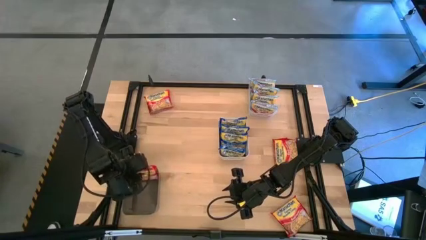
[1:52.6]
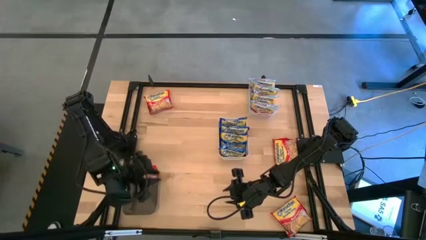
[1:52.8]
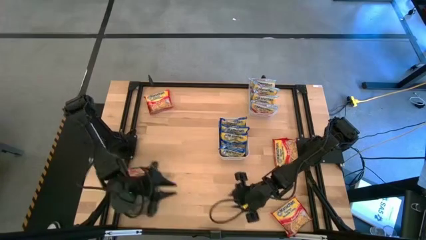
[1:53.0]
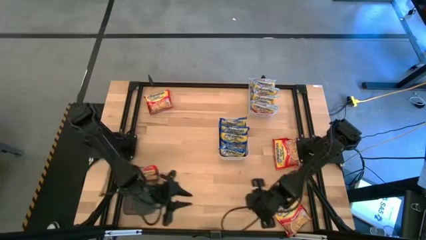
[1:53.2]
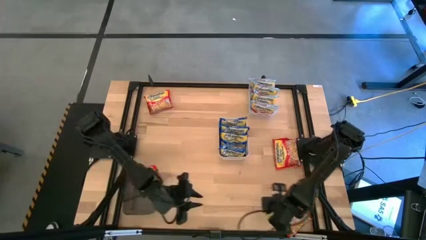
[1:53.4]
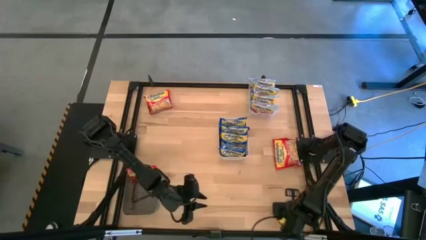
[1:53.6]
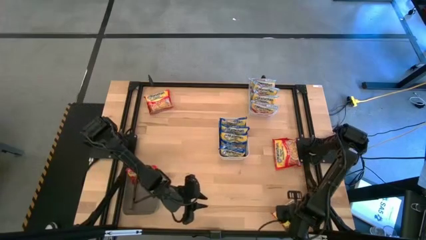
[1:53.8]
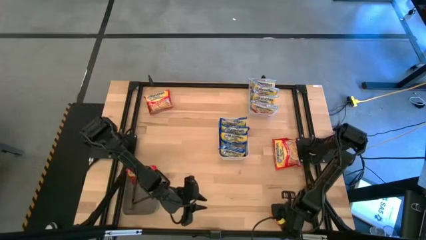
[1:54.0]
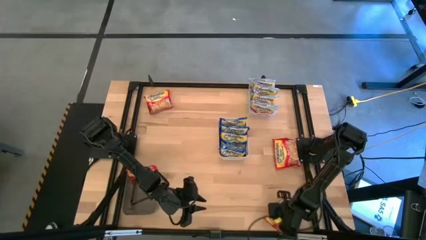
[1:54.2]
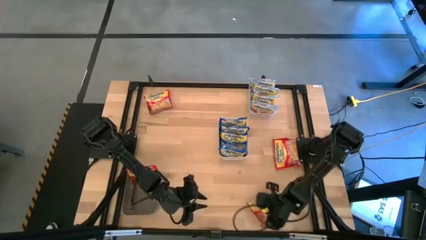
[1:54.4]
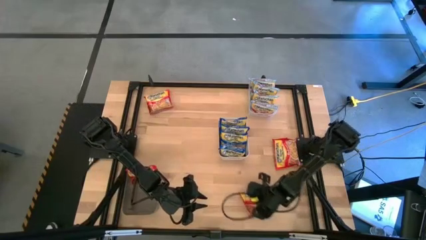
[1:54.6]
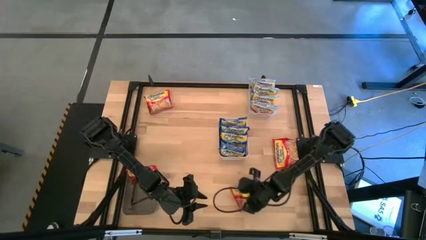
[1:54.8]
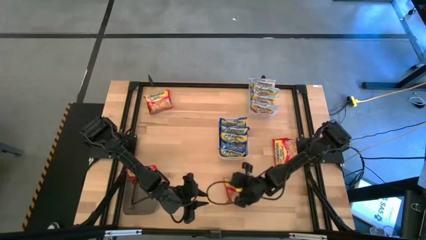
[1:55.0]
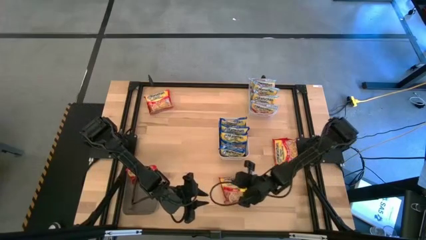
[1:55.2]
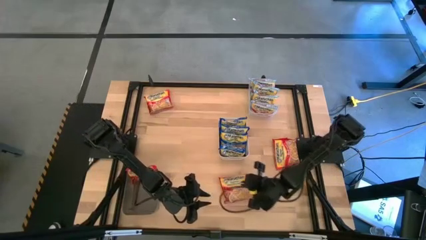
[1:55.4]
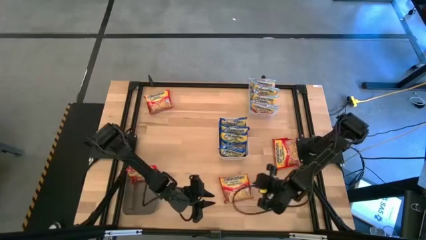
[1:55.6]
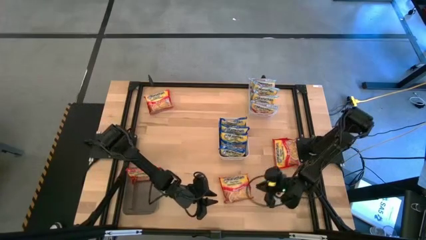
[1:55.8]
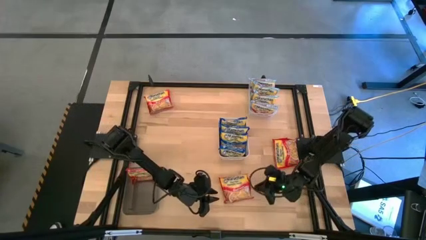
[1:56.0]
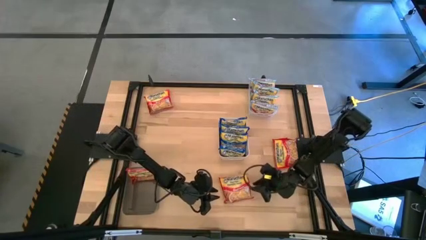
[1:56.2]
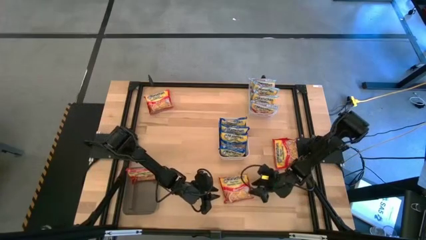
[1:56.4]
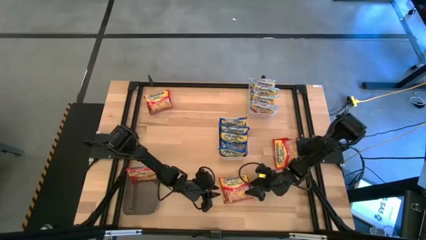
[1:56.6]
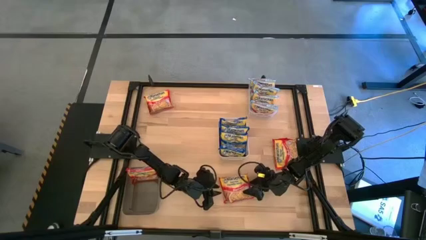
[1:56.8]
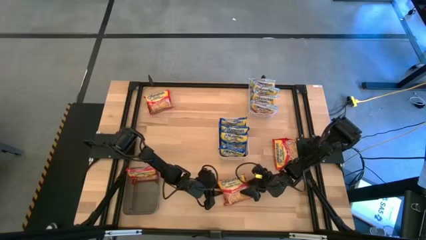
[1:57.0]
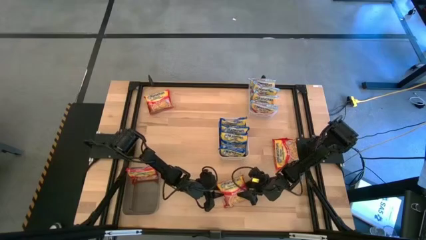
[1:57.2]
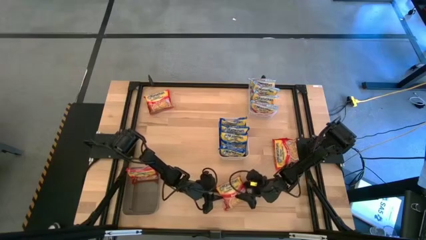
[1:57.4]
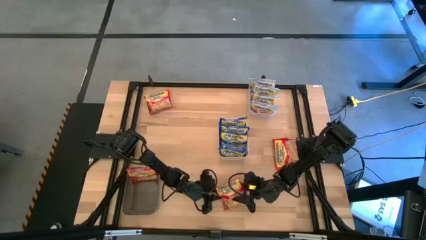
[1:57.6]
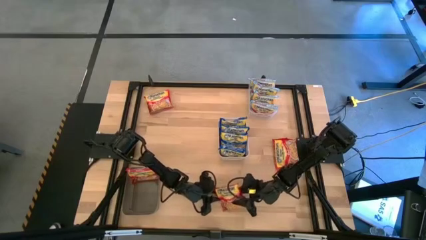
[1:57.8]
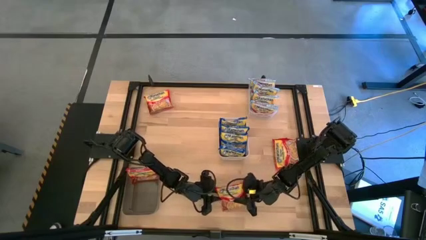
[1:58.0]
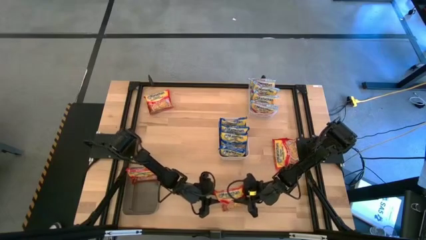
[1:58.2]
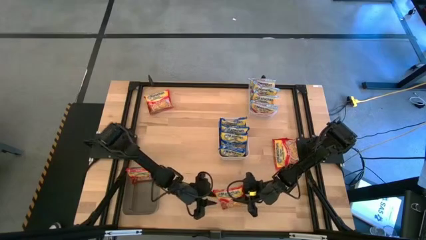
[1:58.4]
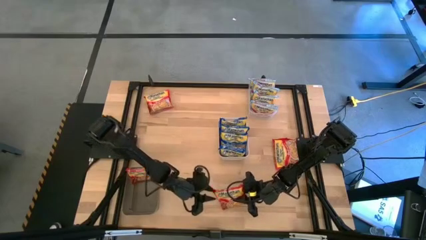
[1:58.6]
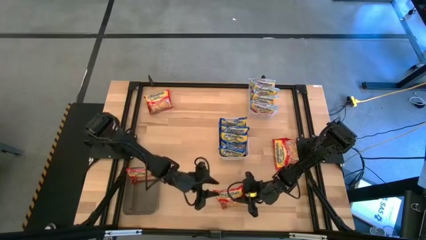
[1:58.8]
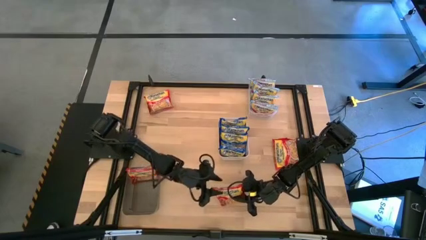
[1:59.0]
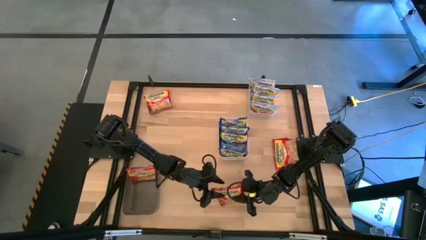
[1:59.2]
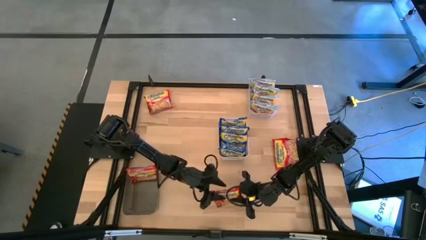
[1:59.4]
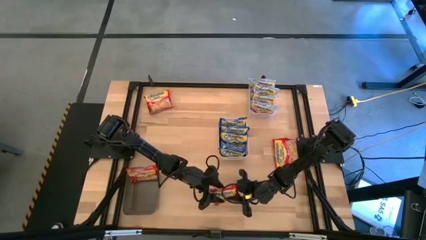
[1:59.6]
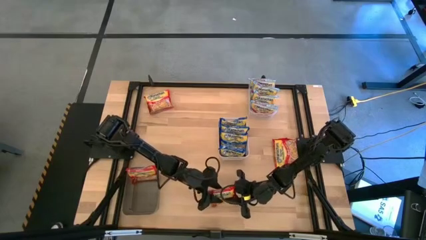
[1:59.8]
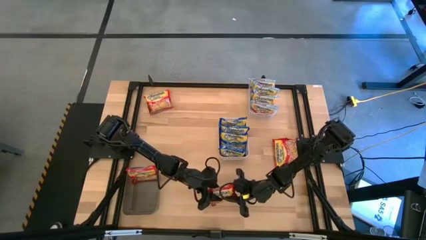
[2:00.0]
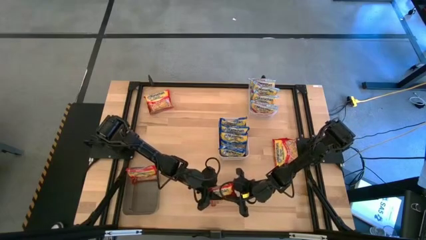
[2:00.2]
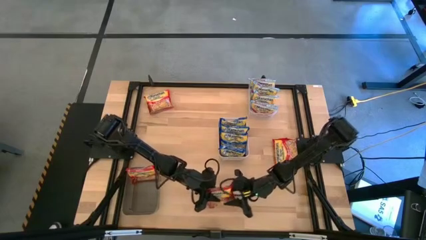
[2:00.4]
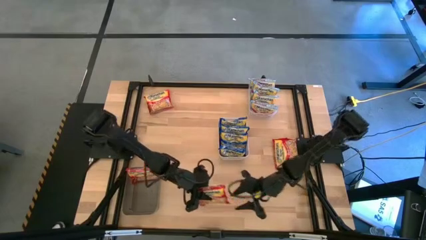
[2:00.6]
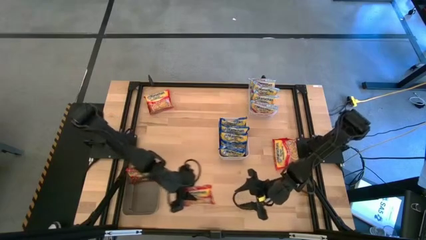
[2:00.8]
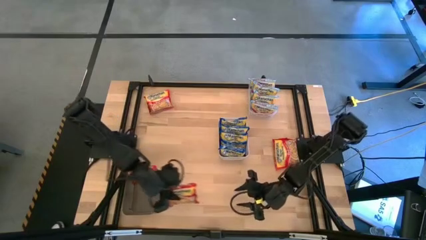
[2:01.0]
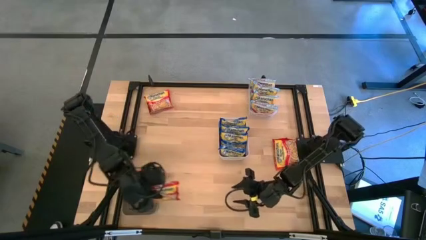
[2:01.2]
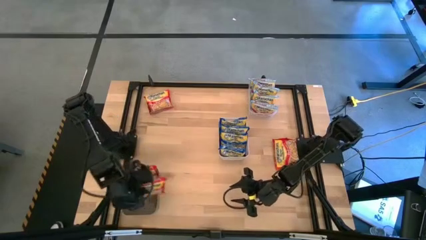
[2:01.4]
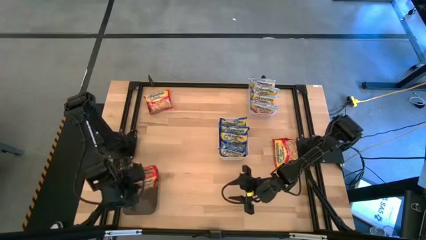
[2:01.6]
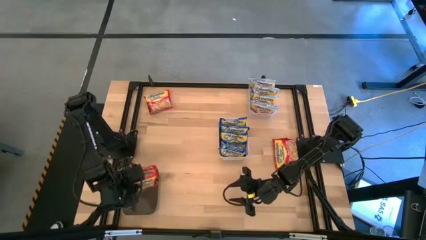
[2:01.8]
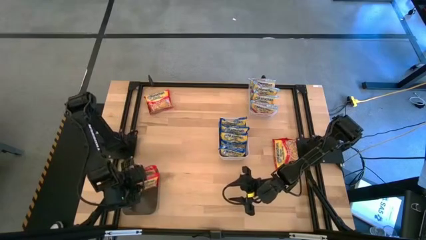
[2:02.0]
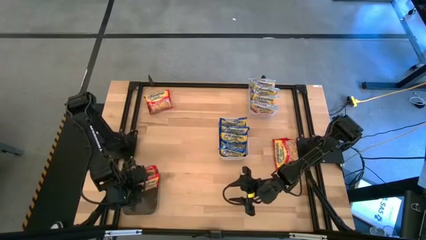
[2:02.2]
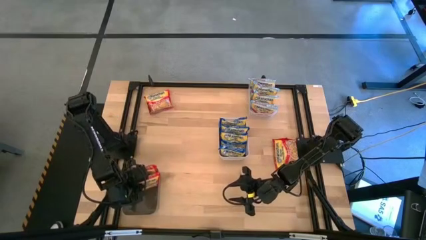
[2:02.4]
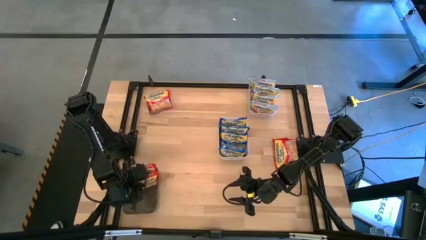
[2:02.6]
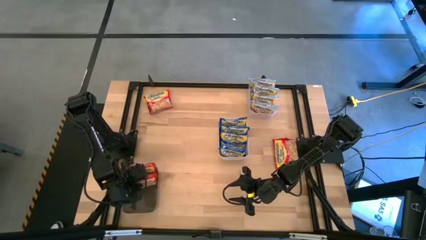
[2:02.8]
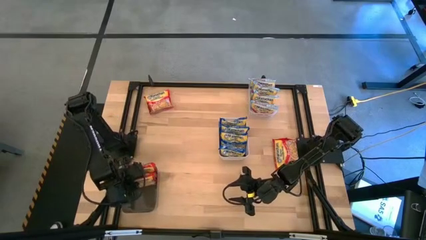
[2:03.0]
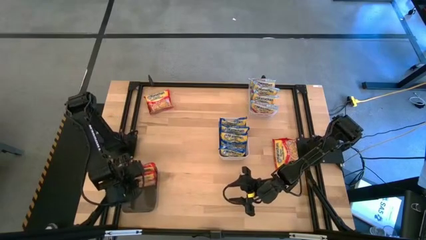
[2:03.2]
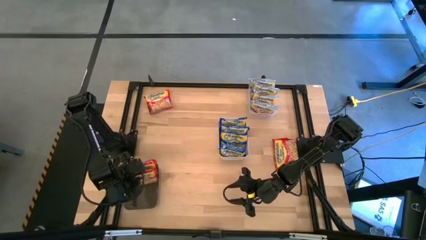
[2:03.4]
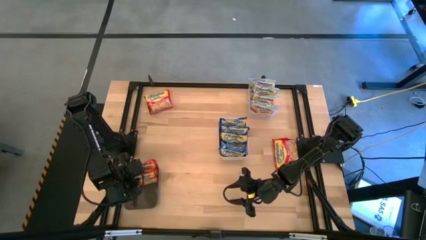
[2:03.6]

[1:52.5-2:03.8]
Task: Sort Maruchan noodles
Put the red noodle pack in the black bin

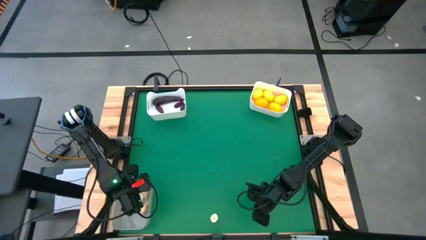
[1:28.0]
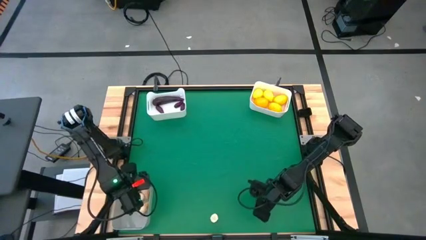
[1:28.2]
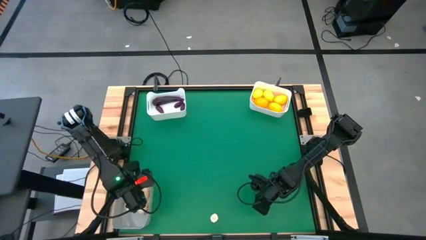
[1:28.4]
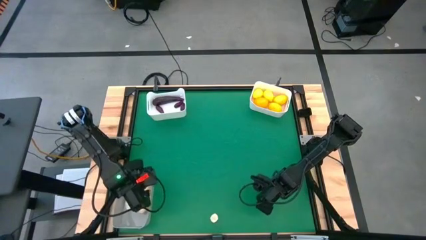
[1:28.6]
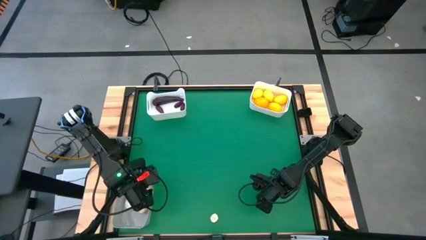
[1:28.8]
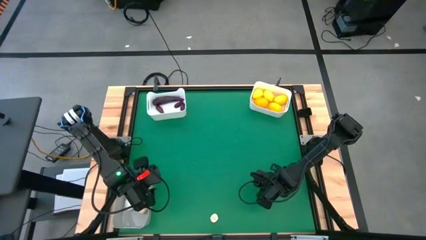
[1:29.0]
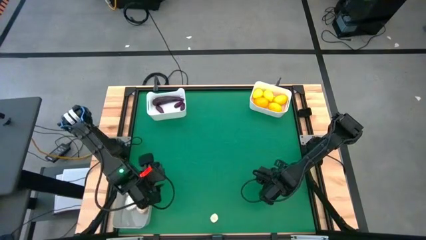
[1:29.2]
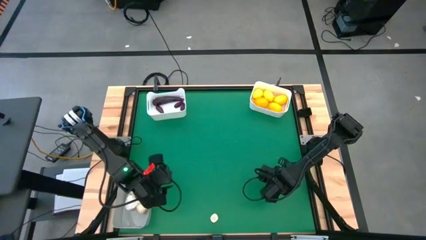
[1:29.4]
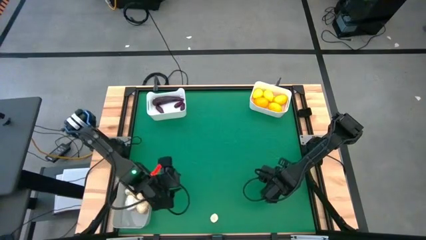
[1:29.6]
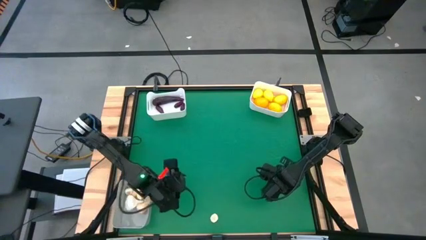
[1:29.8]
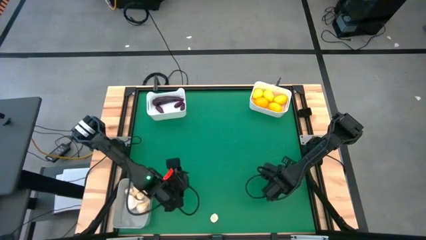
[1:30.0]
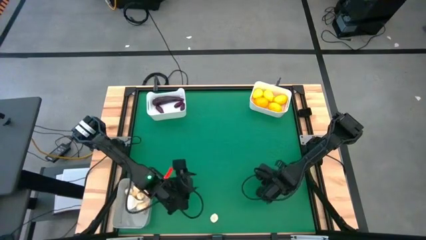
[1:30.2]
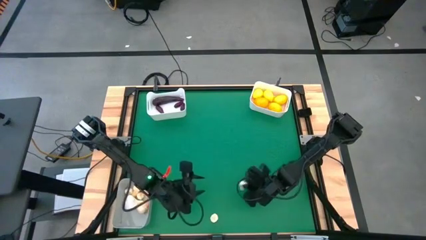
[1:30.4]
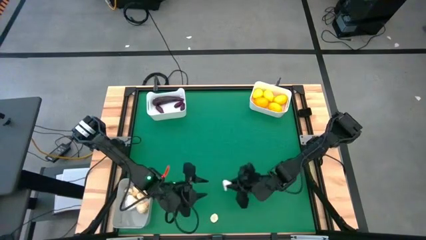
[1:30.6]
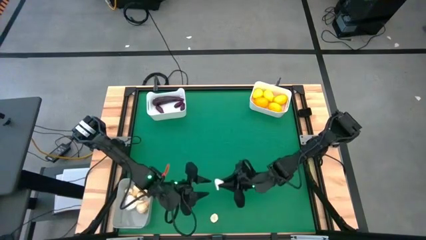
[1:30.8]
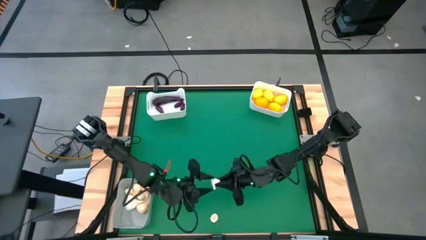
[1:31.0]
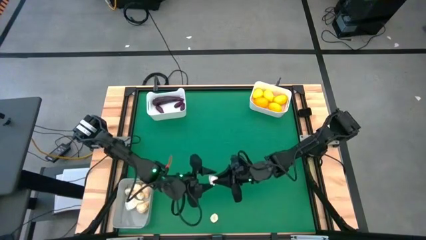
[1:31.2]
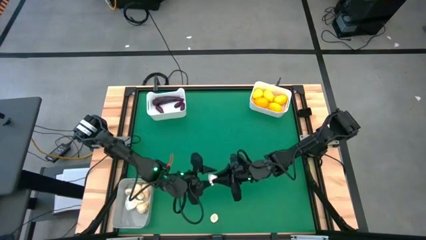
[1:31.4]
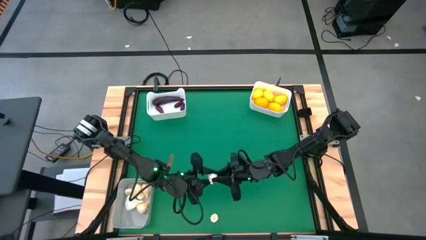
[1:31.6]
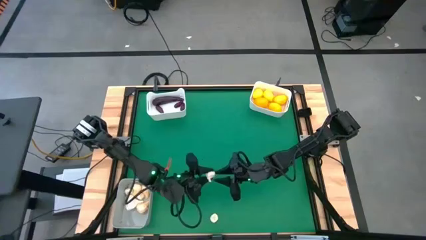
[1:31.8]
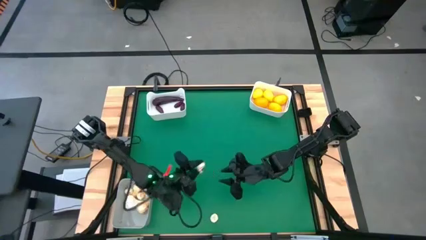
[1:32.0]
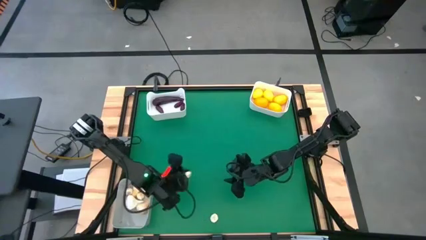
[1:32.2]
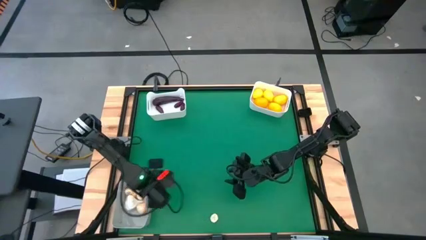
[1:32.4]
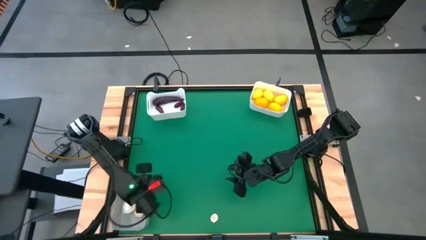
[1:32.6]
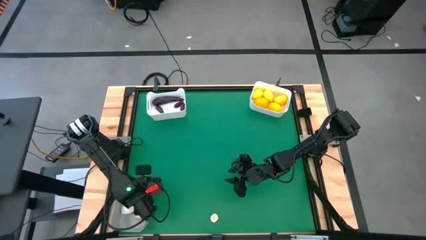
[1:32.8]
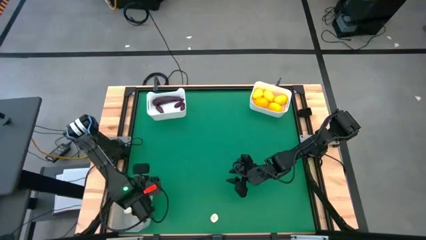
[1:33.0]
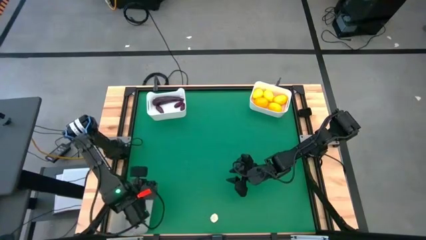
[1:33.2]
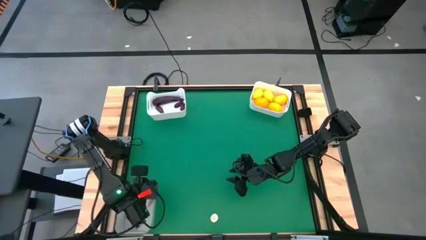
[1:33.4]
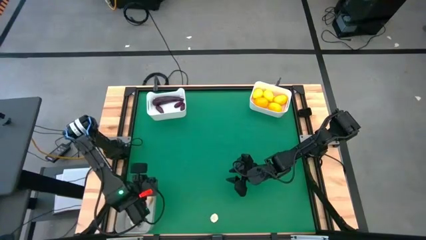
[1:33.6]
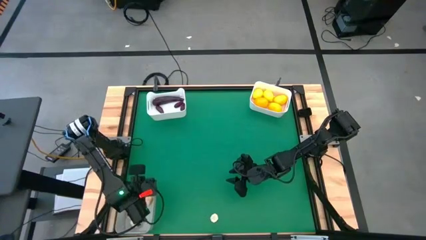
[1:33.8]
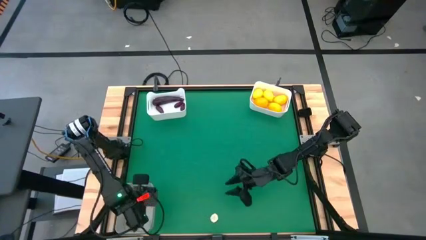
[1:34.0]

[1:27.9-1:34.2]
Task: Sort produce into baskets
Put the right white garlic into the gray bin
